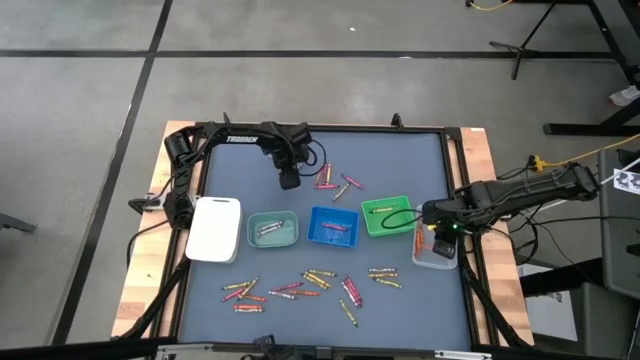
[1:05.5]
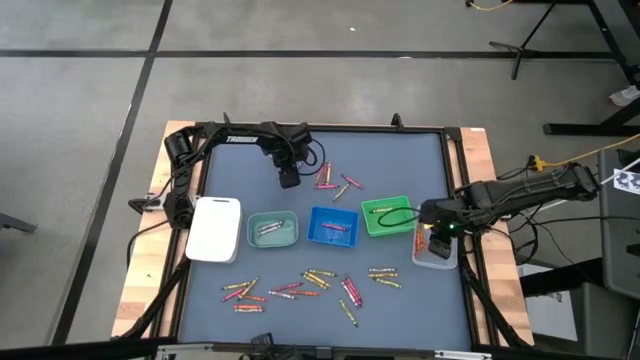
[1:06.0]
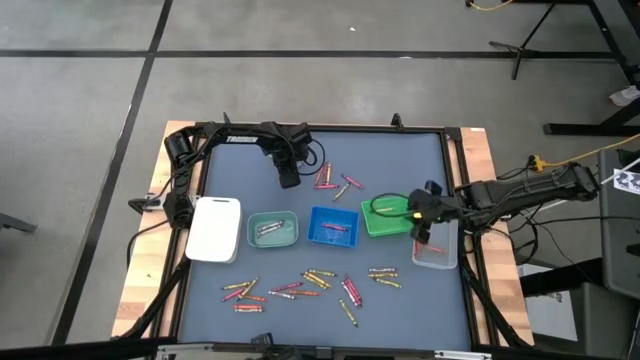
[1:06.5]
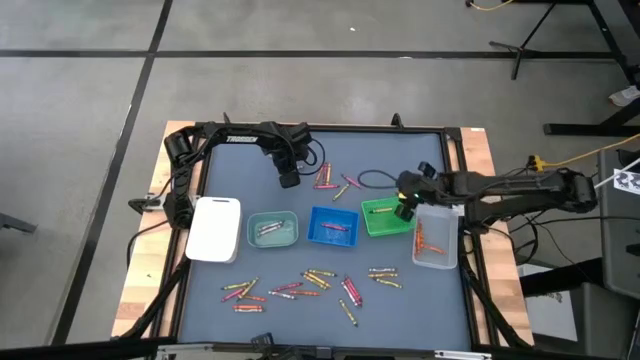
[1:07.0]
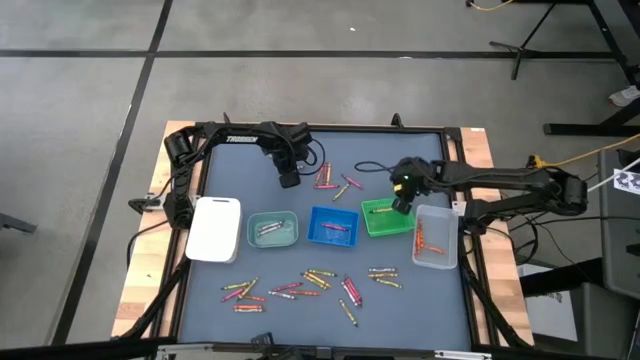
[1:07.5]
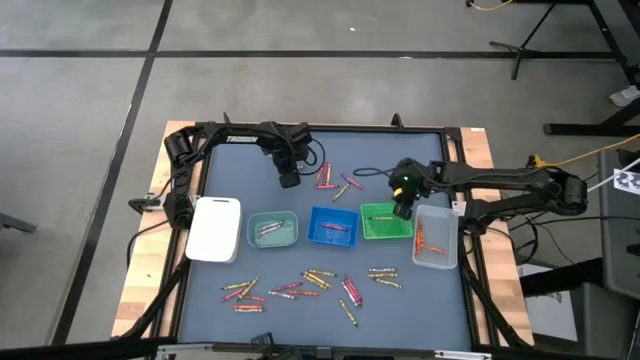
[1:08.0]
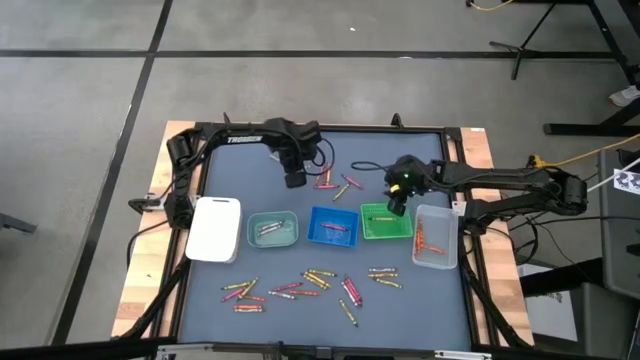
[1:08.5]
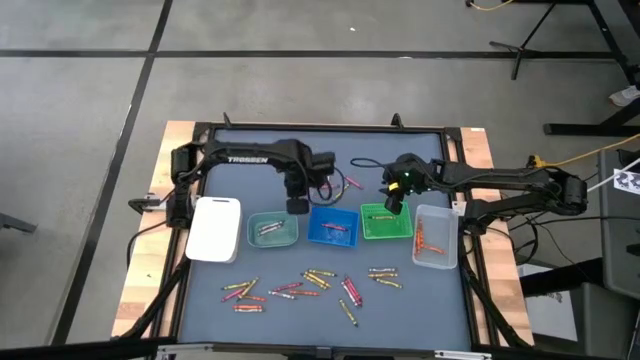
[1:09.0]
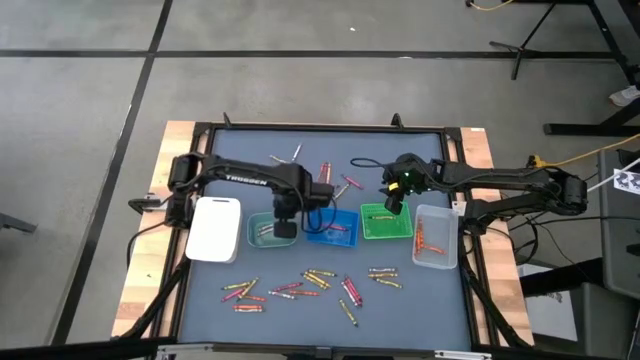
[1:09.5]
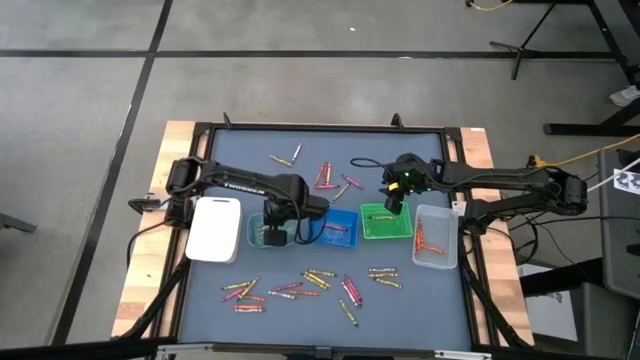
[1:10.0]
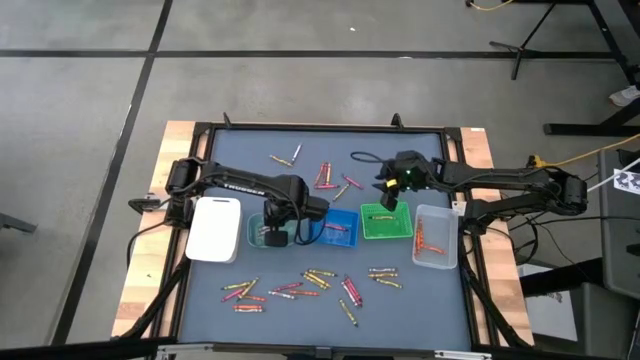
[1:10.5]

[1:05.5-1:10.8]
Task: Sort crayons
Put the gray crayon into the light green bin

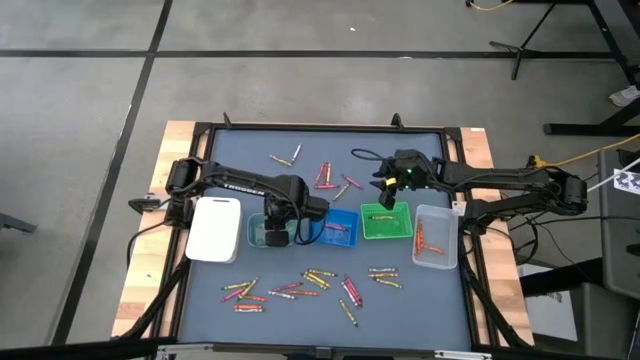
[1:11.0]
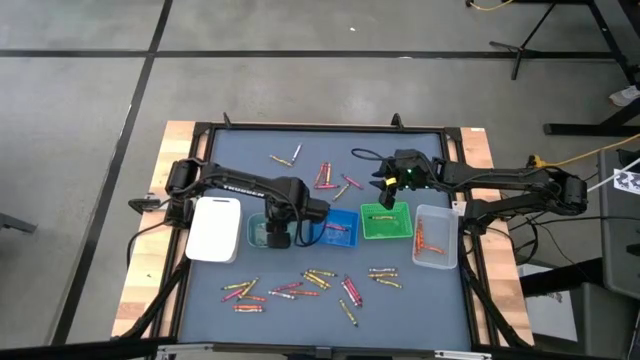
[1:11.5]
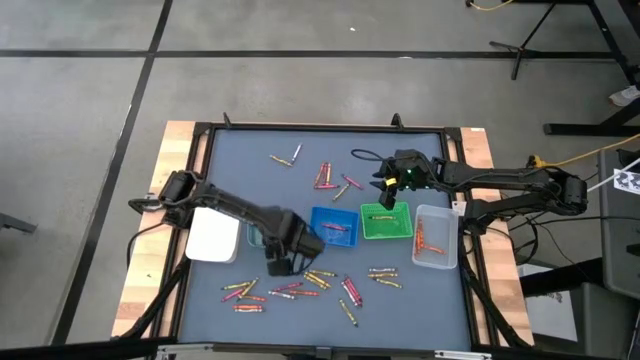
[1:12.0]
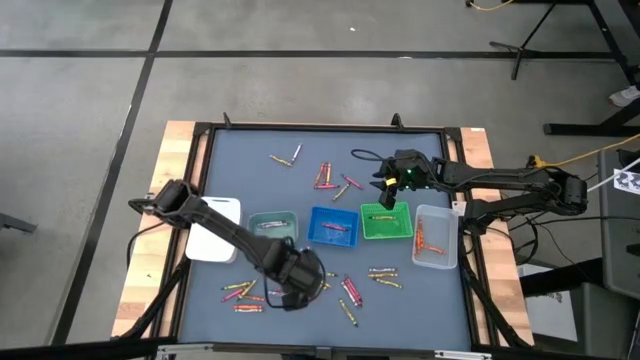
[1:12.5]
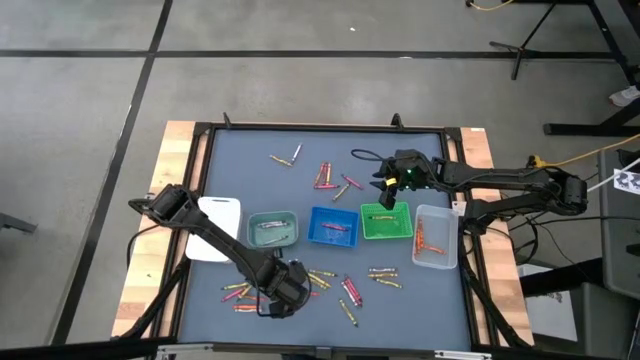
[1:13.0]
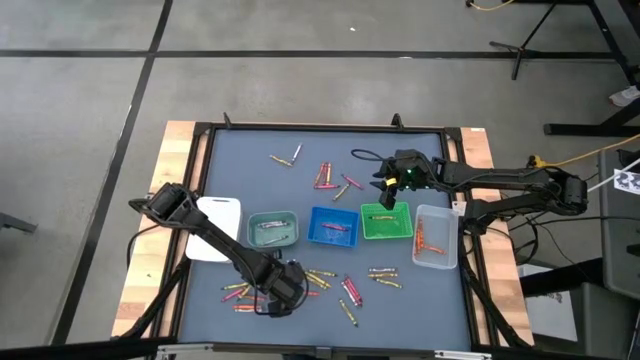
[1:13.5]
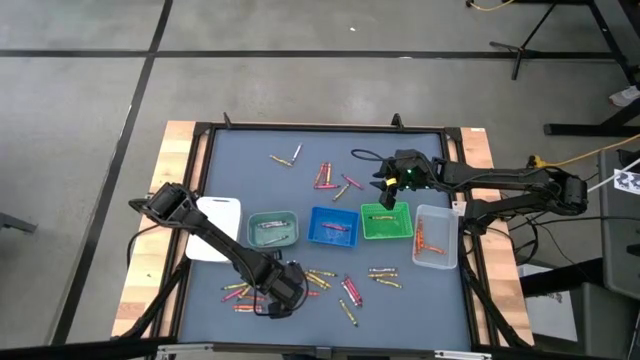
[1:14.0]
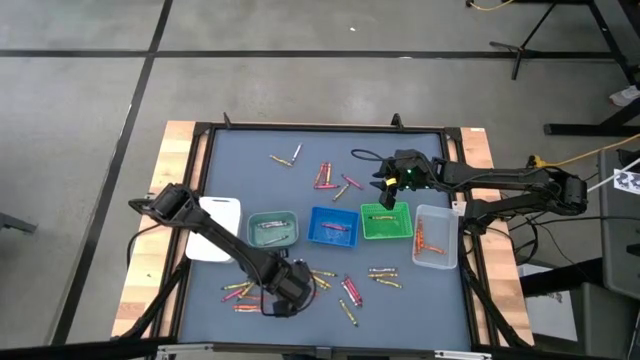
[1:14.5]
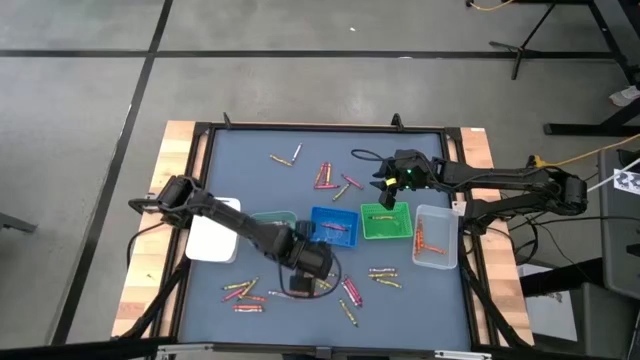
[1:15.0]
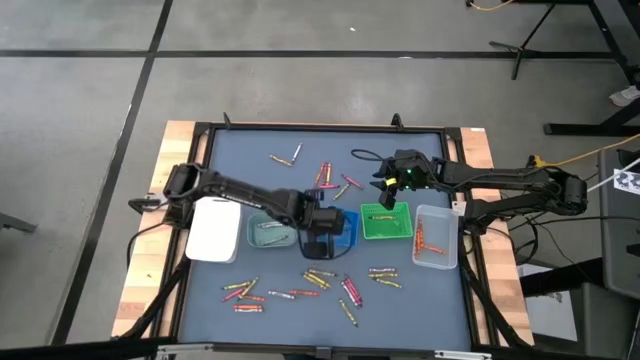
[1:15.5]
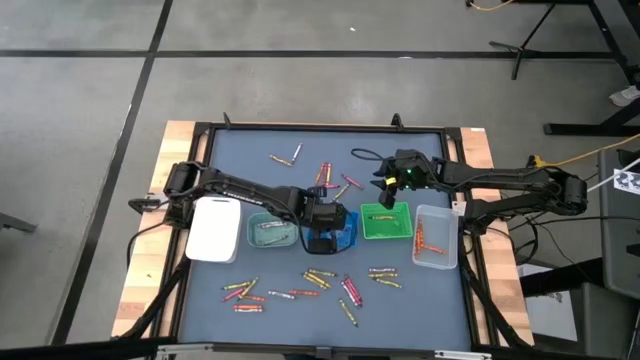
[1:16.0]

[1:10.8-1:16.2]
Put the red crayon into the blue bin

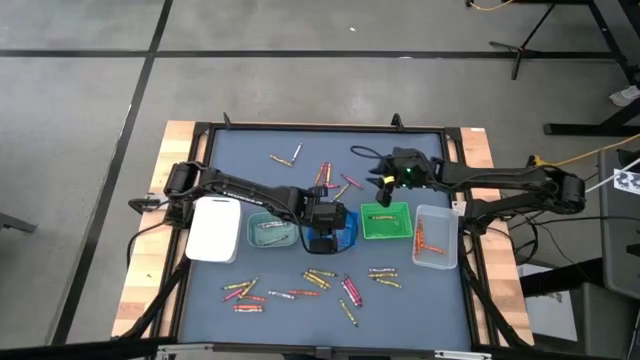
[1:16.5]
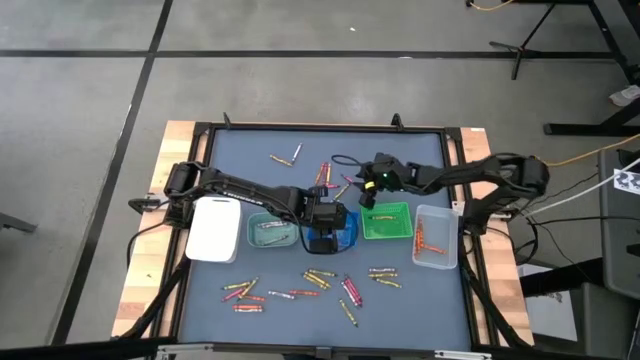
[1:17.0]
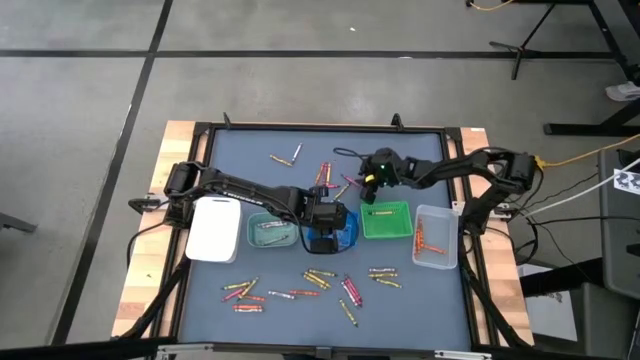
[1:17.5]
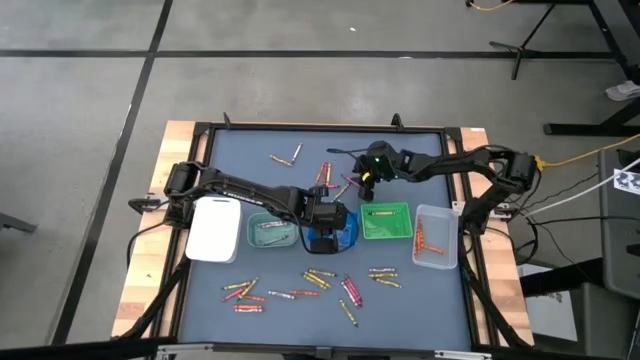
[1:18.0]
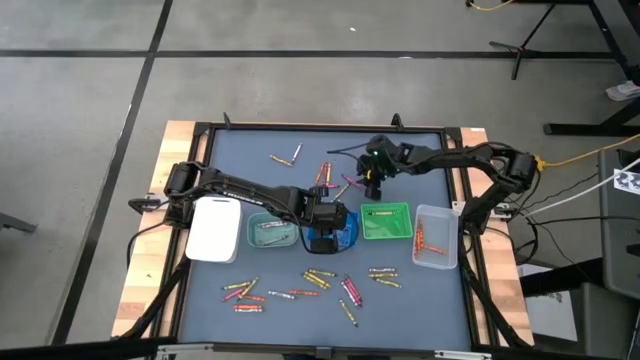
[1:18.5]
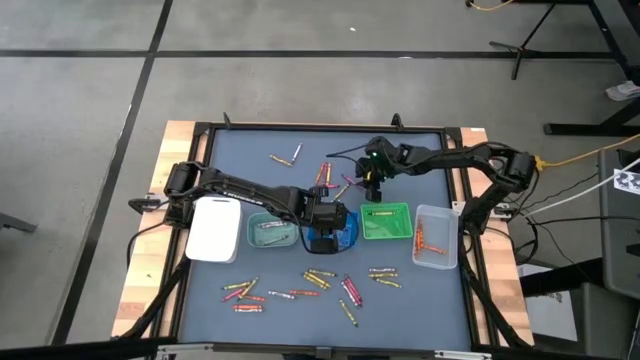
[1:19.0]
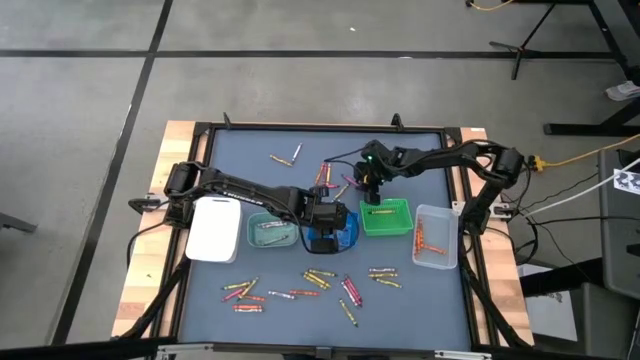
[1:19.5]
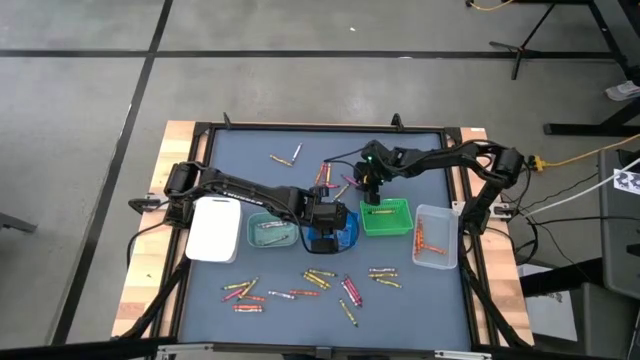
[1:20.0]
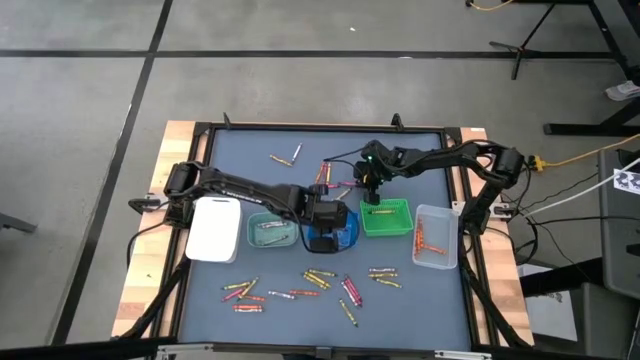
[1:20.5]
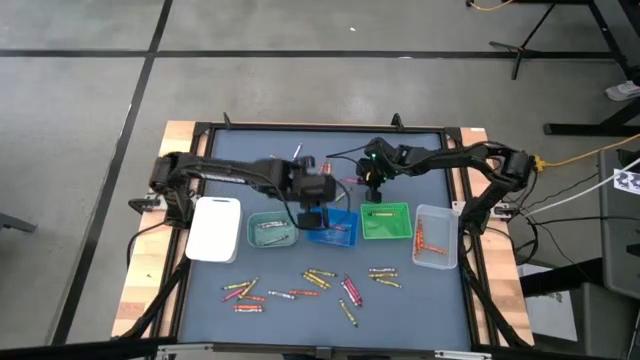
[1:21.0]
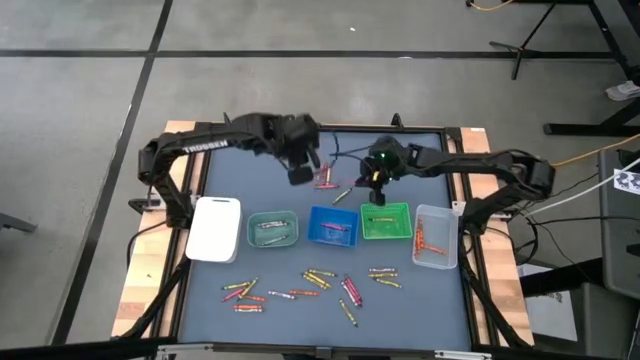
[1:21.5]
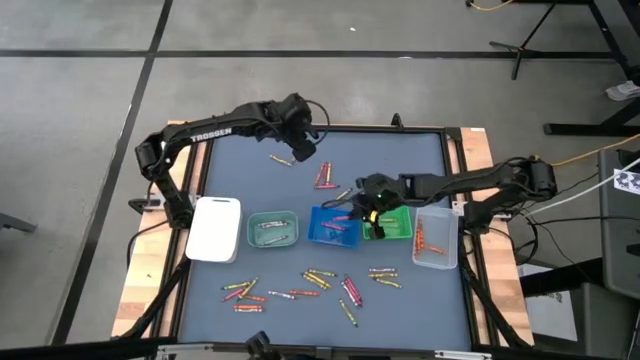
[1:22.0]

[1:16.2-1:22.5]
Put the red crayon into the blue bin

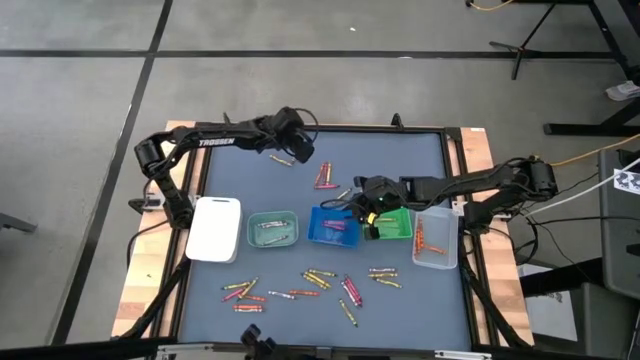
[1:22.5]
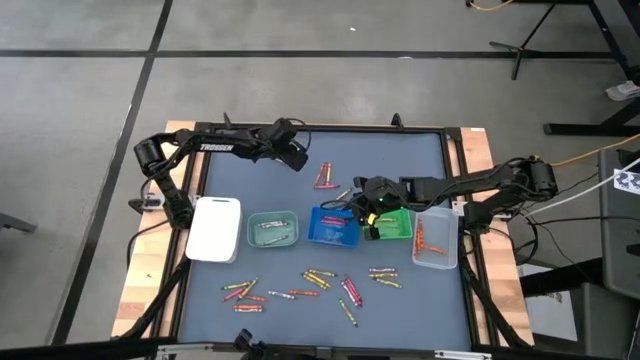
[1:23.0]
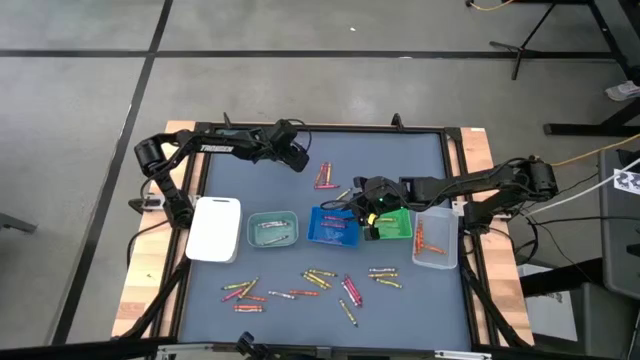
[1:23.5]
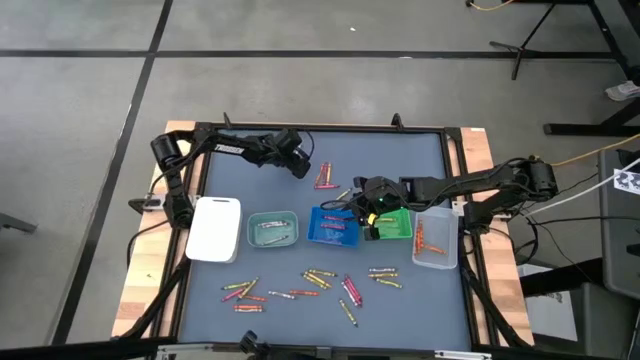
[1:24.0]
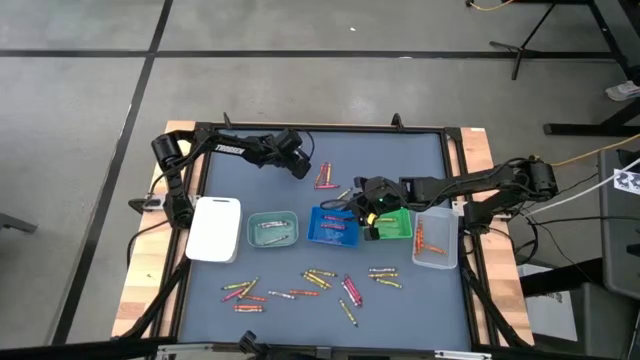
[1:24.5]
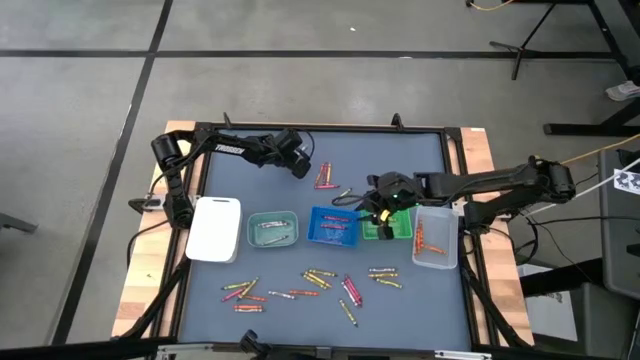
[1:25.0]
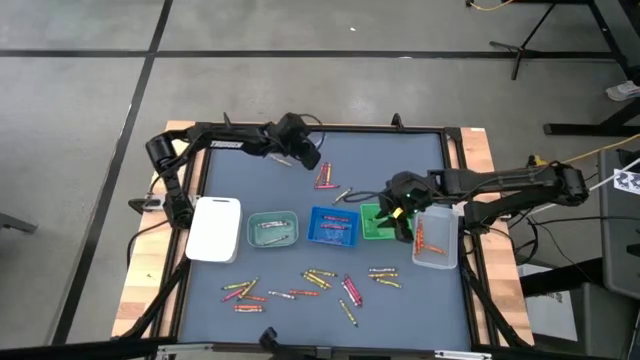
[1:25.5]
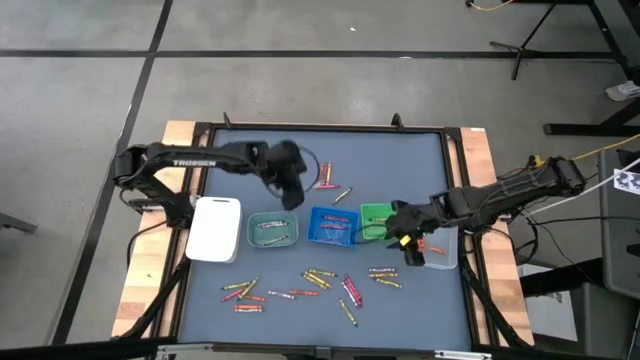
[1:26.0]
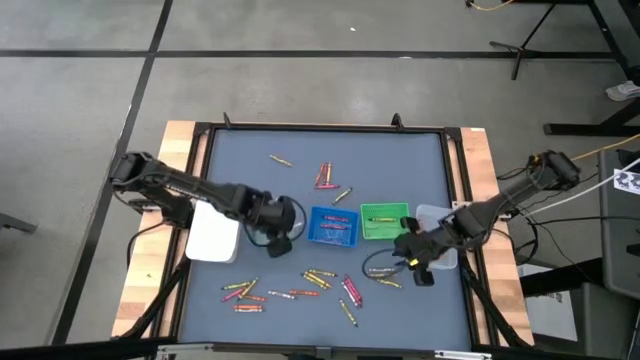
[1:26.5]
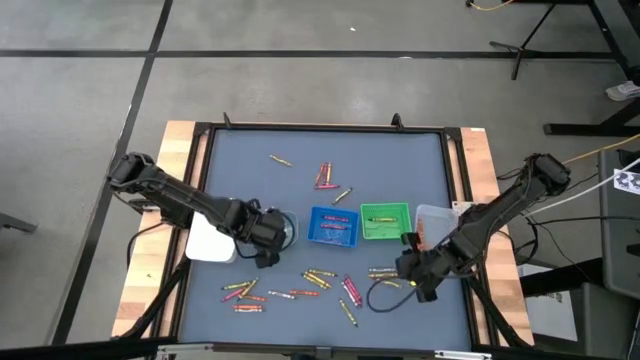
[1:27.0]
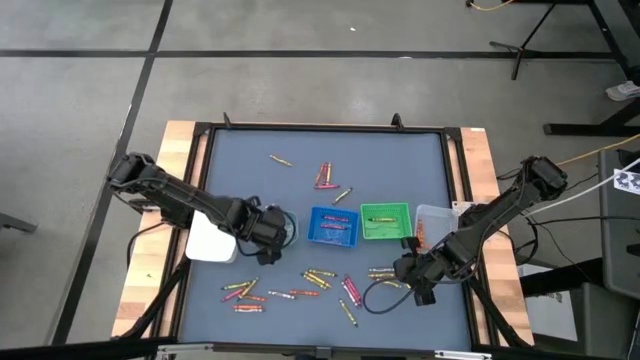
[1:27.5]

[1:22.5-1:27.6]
Put the gray crayon into the light green bin
